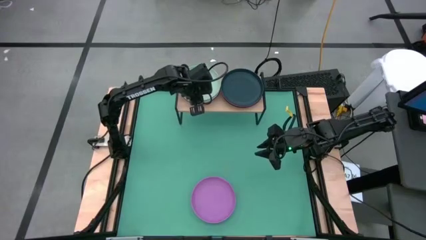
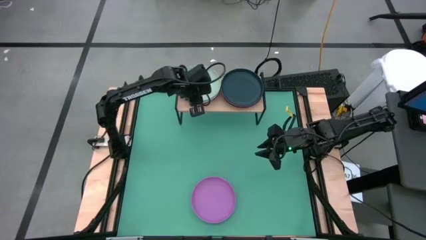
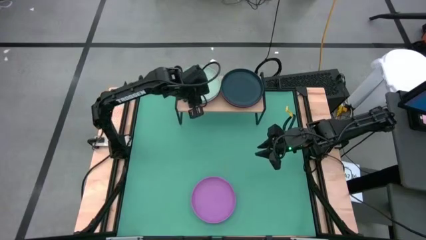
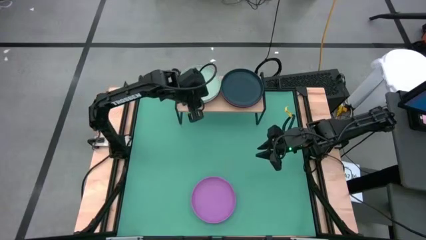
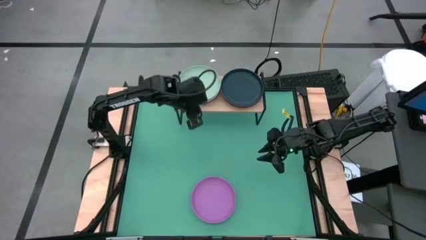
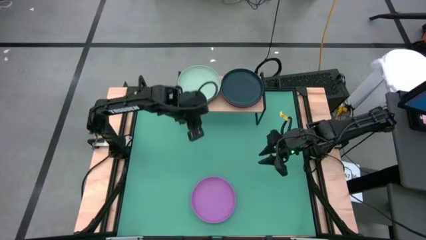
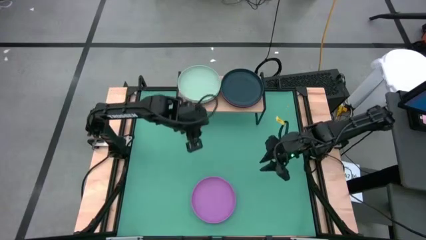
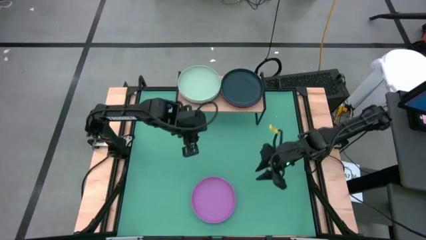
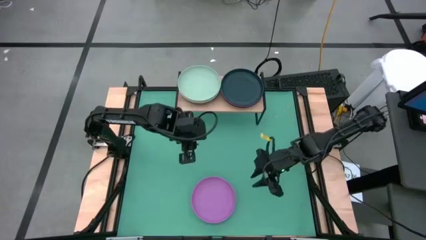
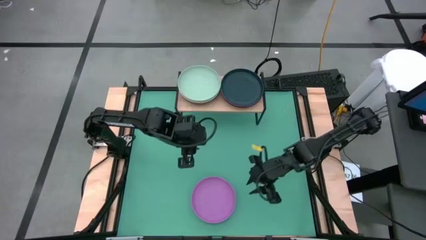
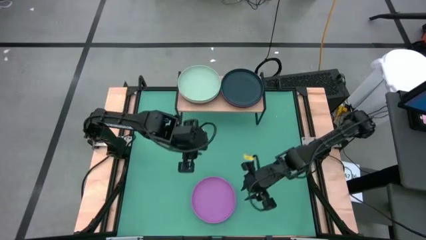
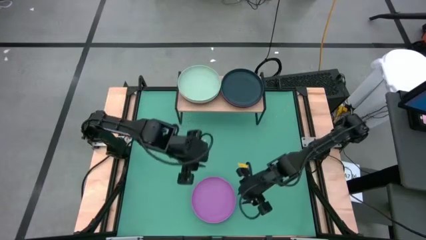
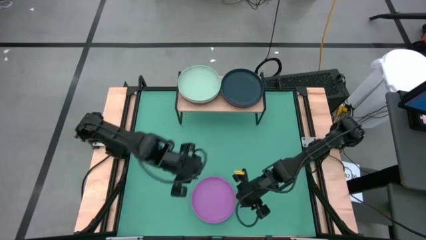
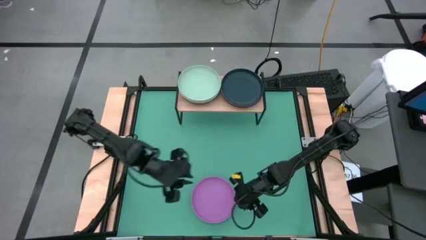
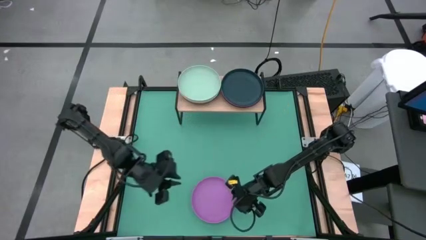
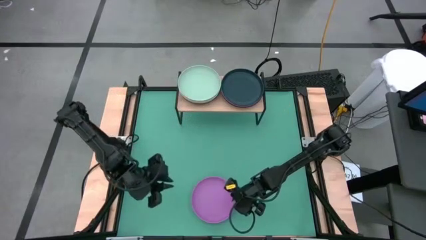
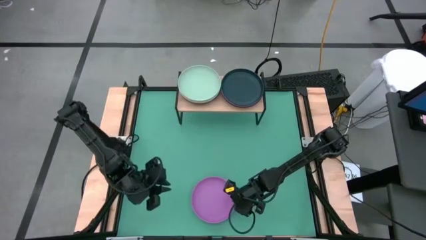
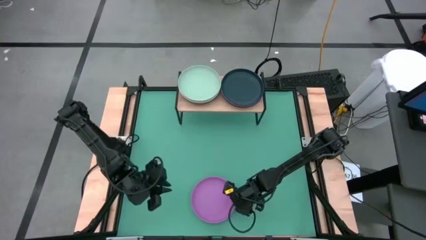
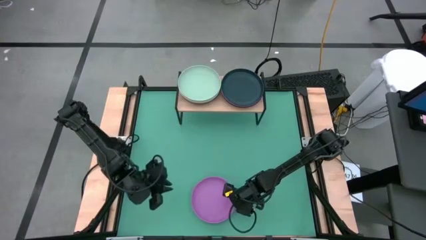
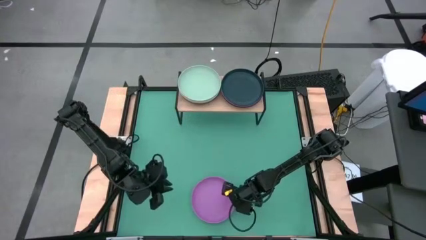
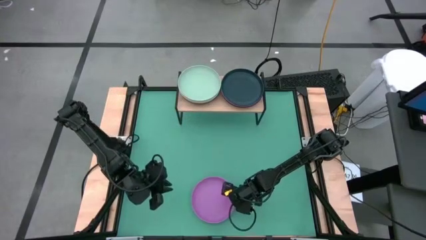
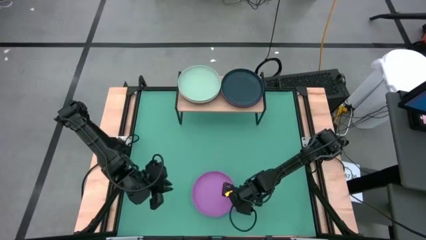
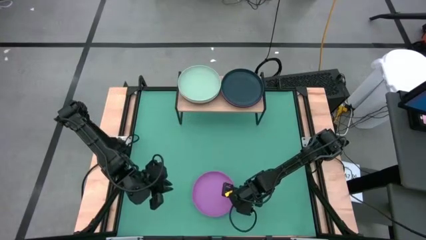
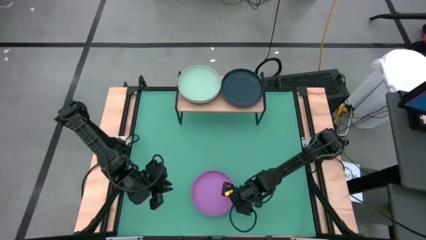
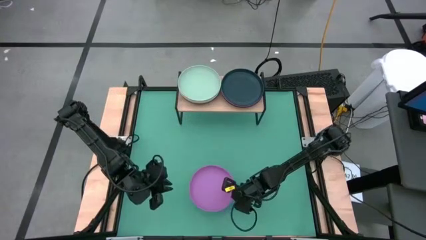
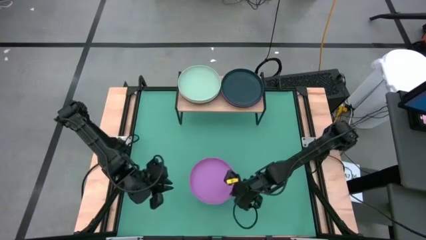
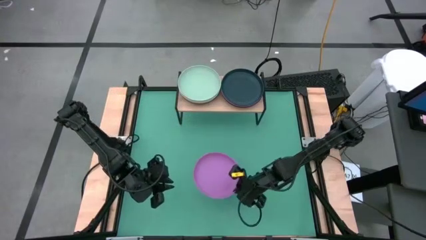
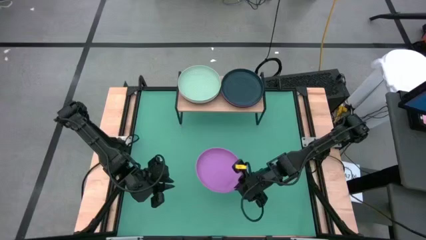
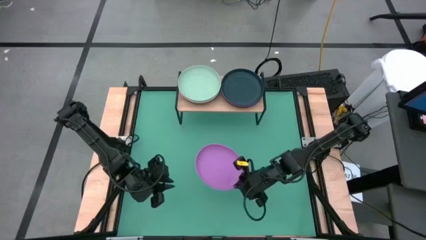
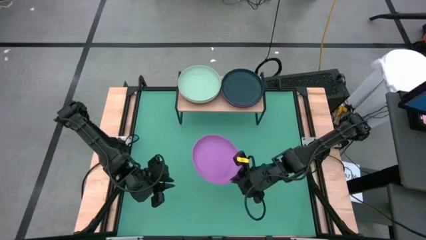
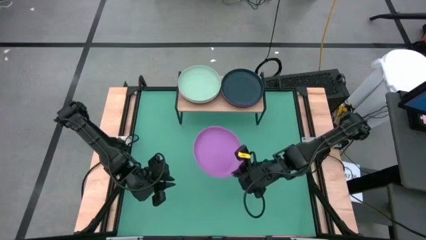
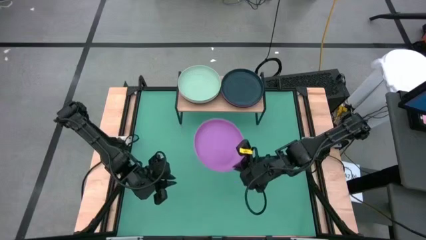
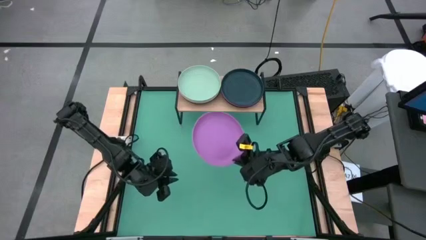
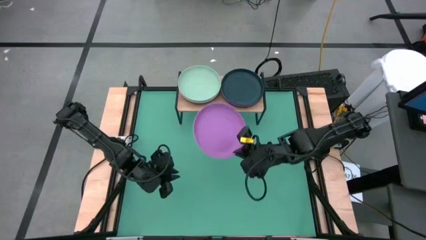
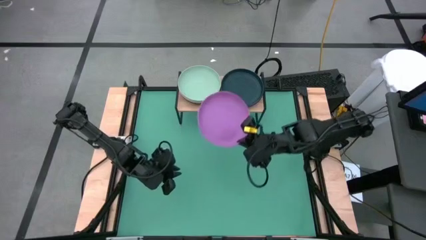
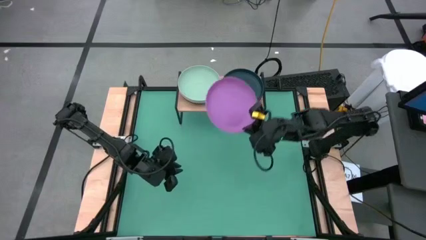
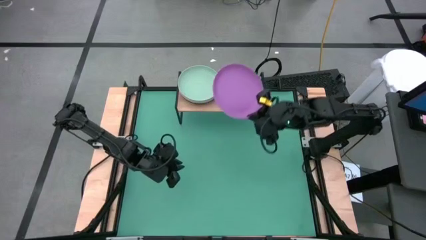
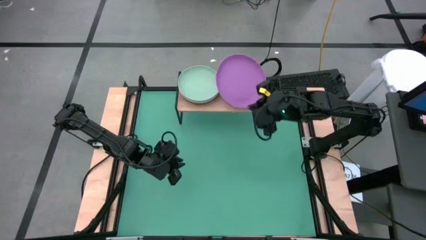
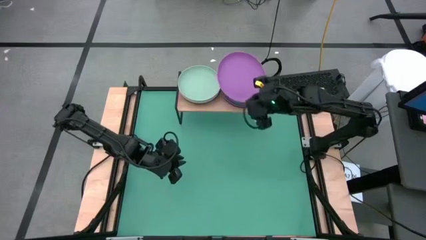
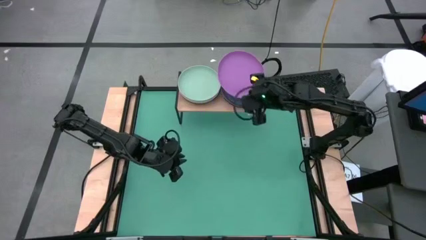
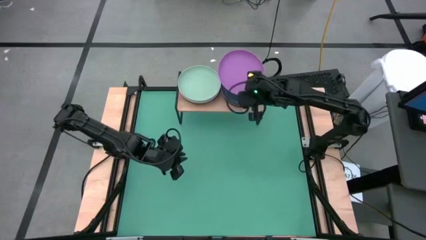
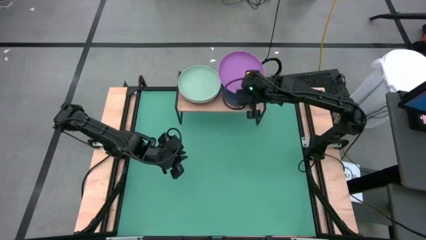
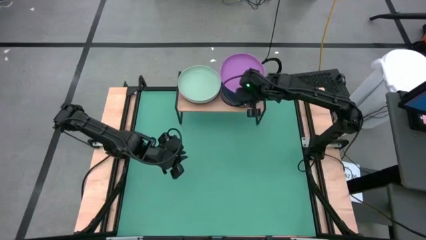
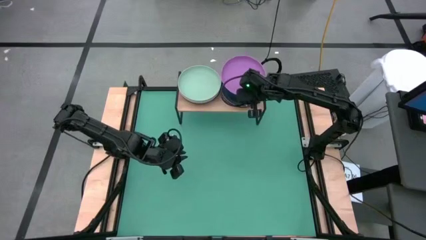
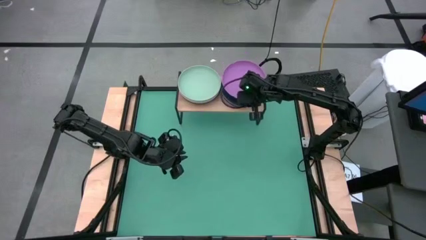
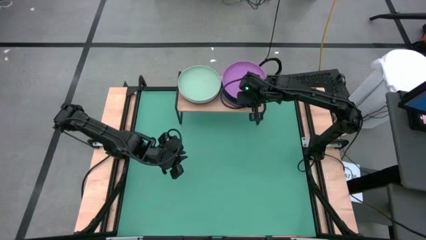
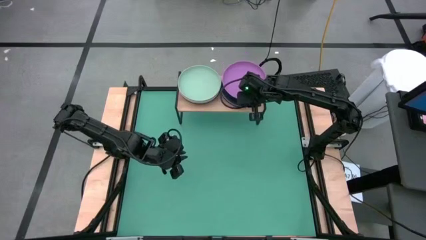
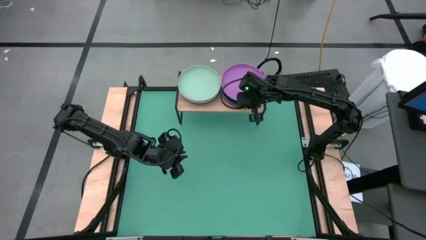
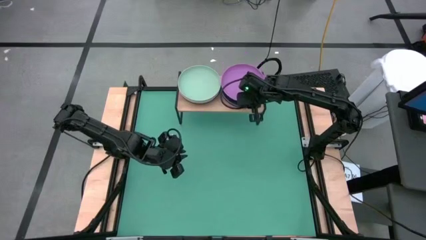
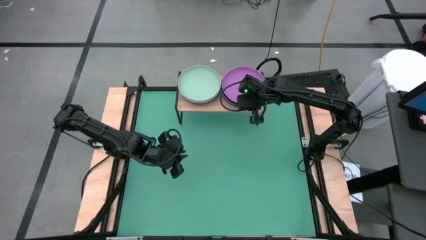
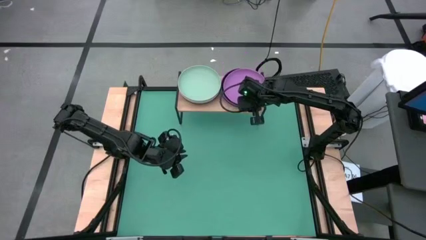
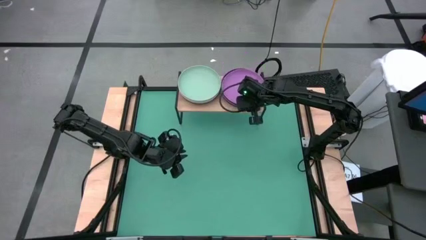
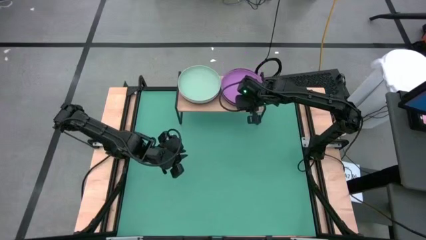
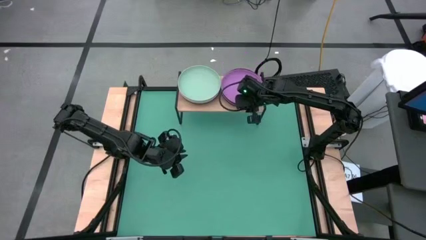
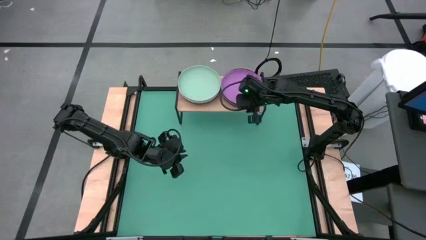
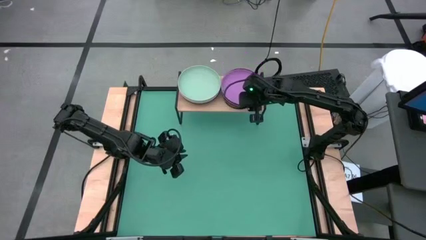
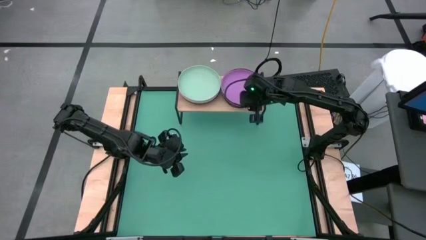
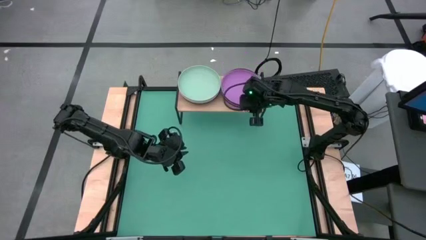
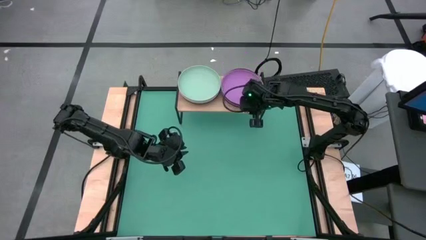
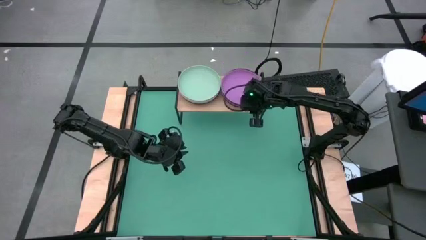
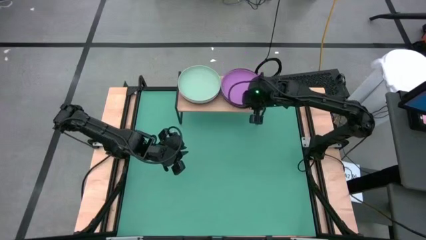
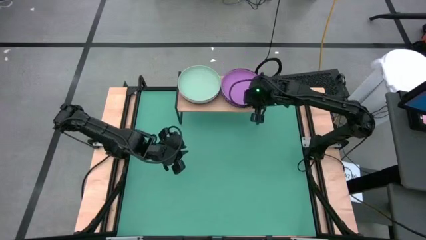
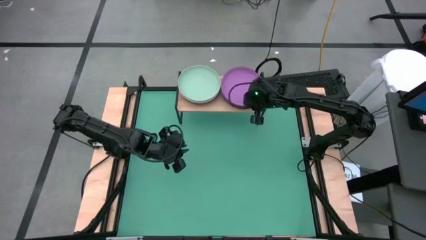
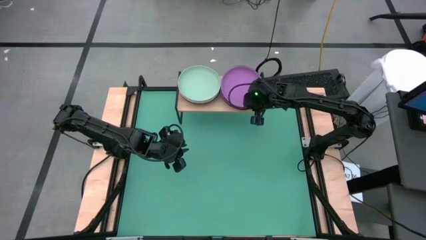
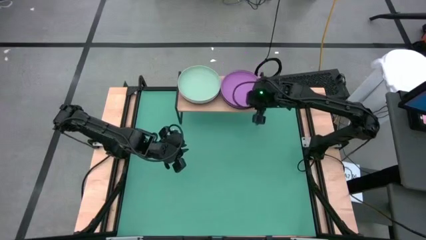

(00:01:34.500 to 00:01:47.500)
Task: Place and stack plates onto a shelf
Stack the purple plate on top of the dark blue plate on the shelf

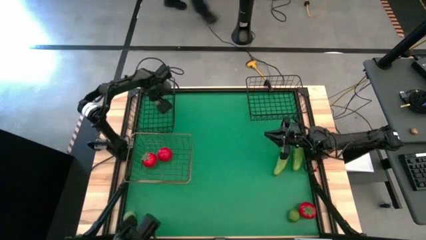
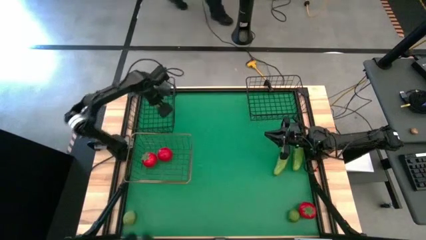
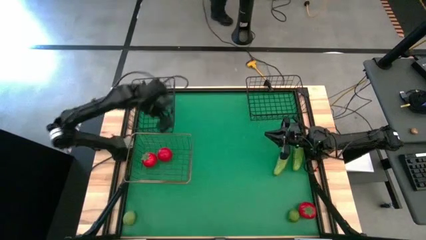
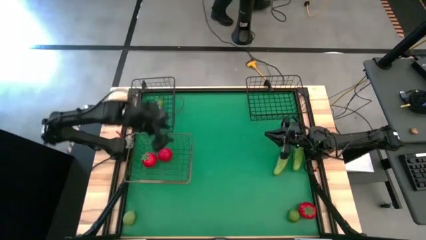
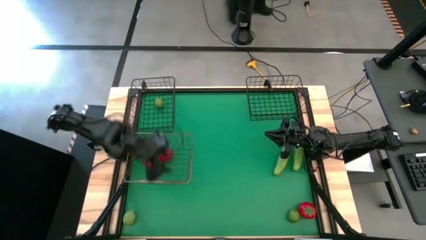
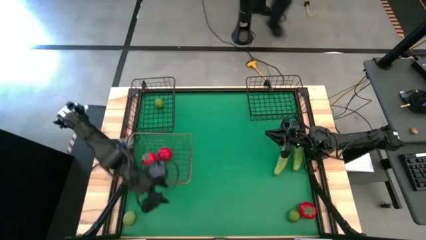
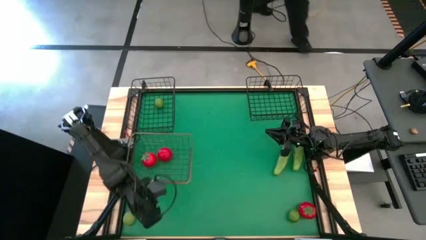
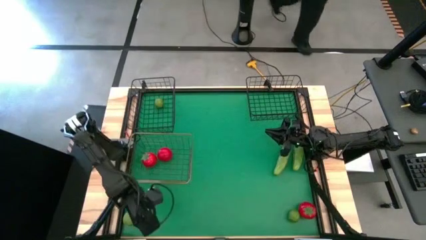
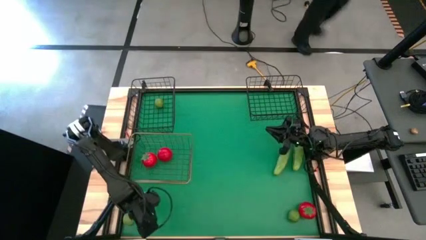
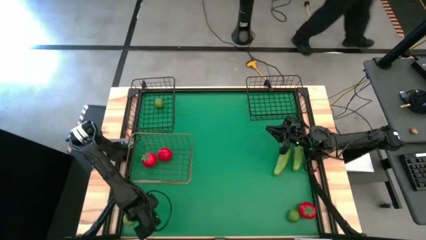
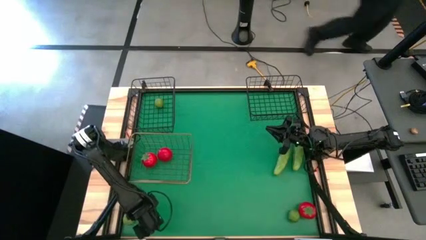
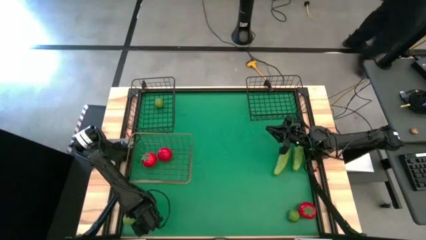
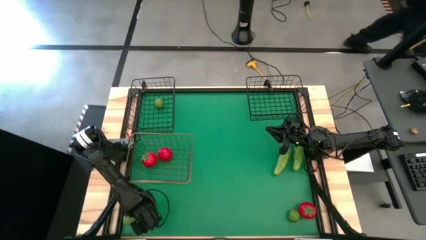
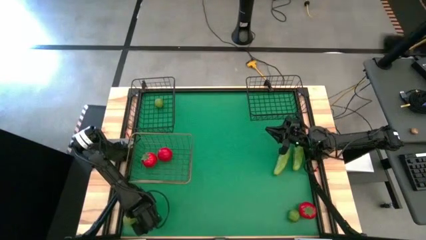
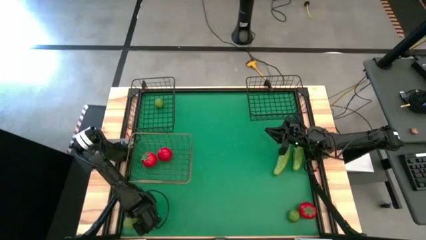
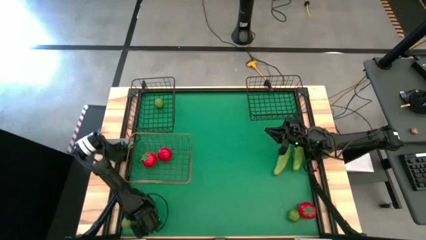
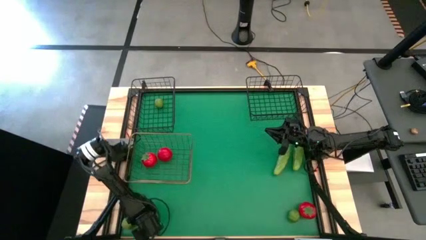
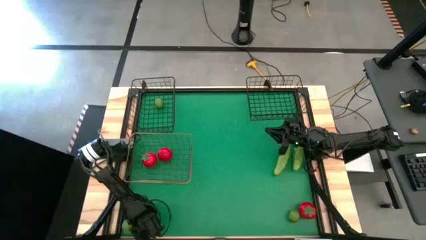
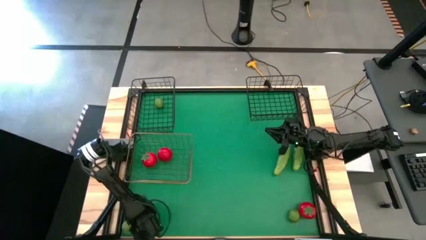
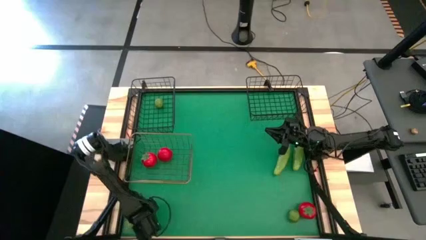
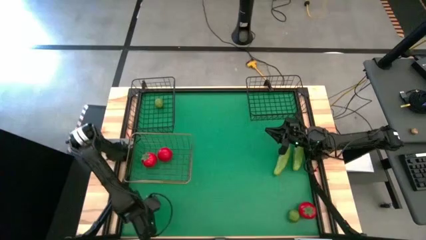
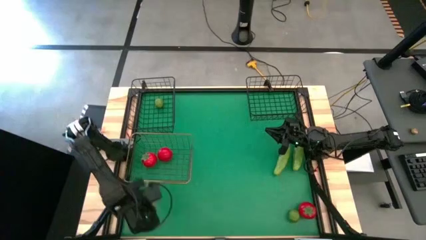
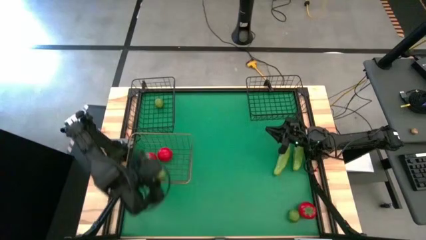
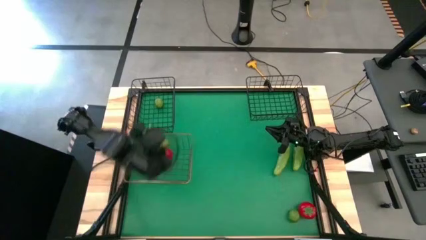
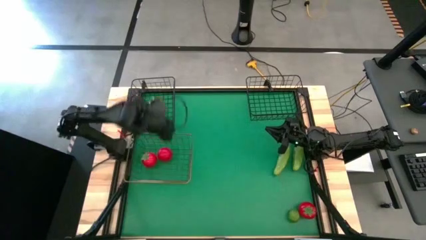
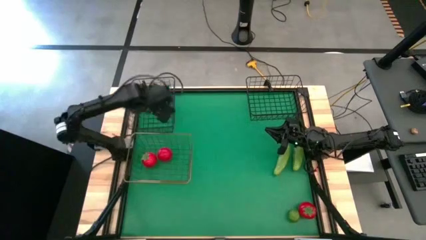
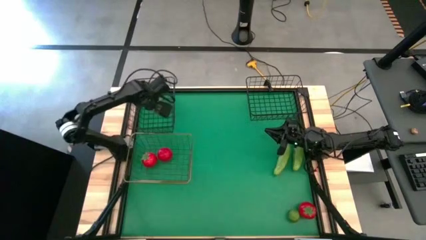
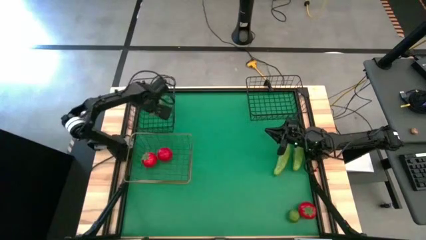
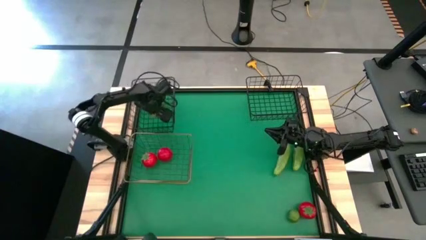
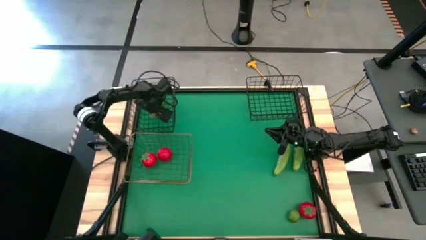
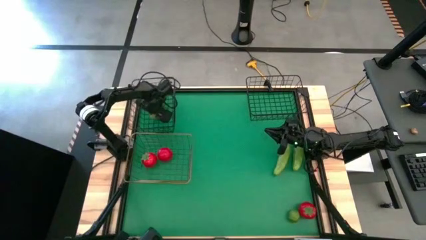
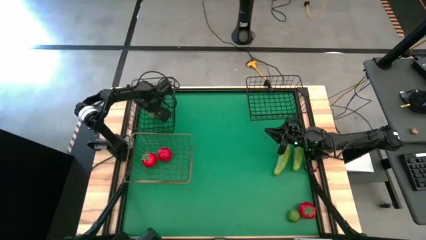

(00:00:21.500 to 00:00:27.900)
Task: Sort produce into baskets
Put the left lime into the left black wire basket
